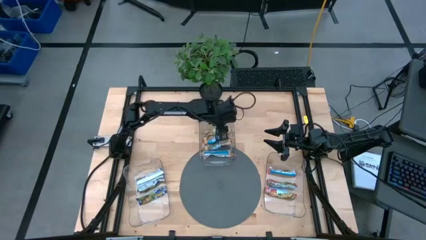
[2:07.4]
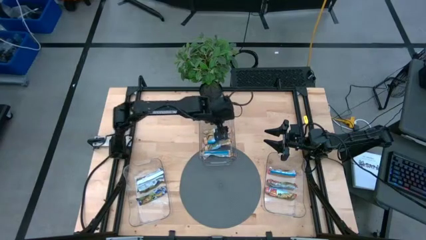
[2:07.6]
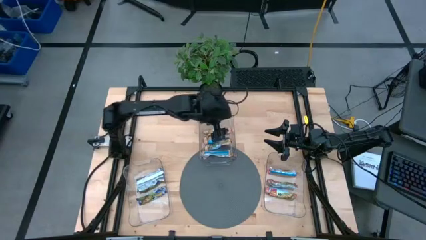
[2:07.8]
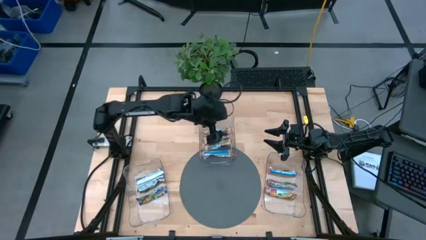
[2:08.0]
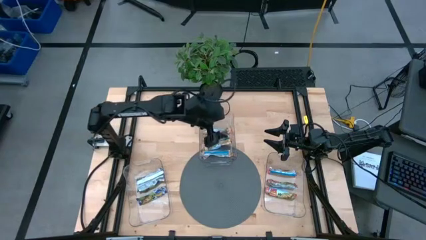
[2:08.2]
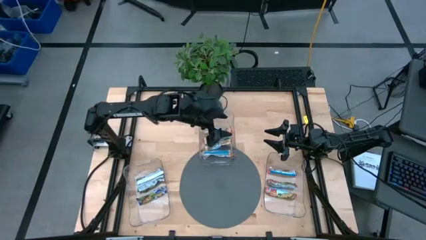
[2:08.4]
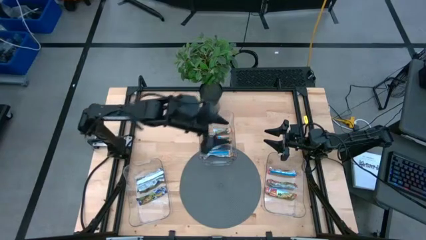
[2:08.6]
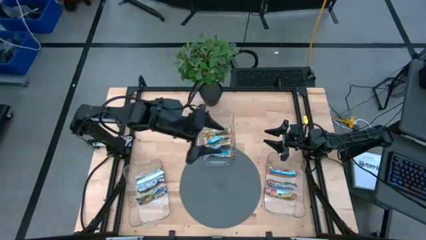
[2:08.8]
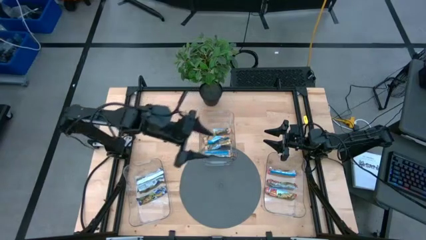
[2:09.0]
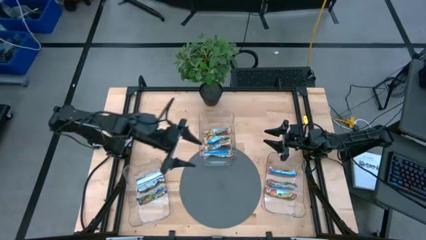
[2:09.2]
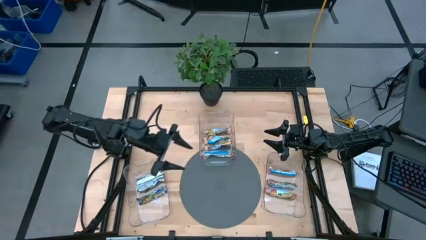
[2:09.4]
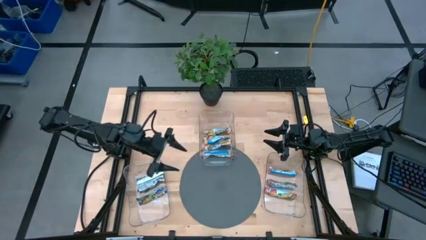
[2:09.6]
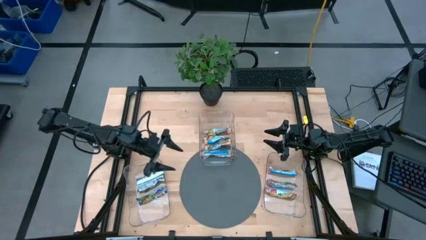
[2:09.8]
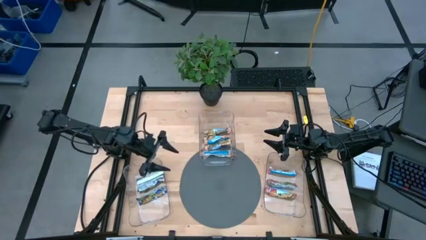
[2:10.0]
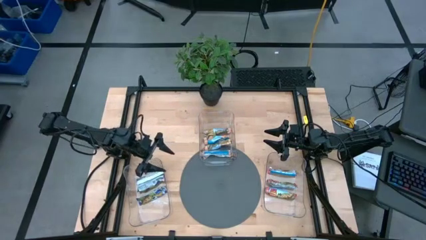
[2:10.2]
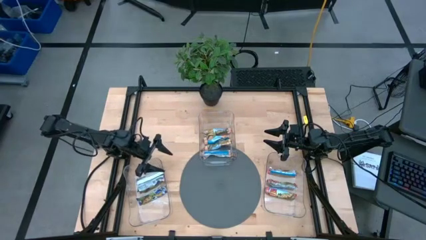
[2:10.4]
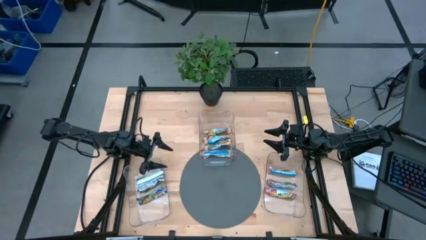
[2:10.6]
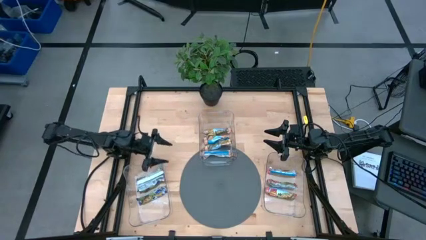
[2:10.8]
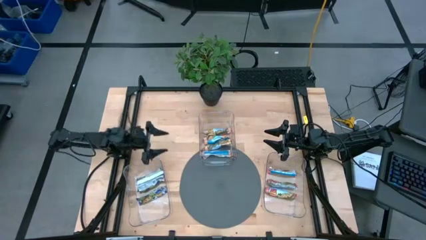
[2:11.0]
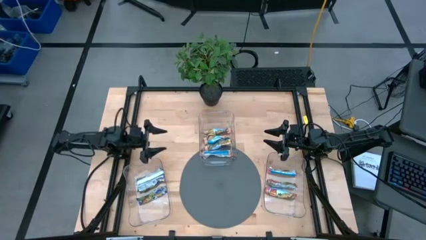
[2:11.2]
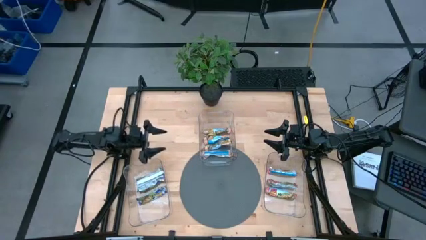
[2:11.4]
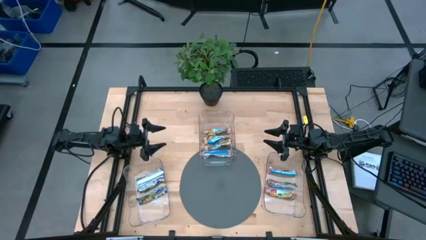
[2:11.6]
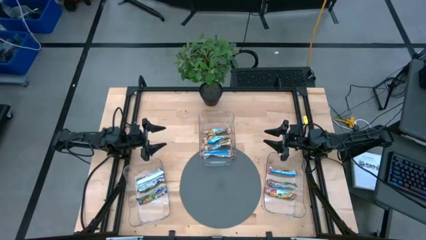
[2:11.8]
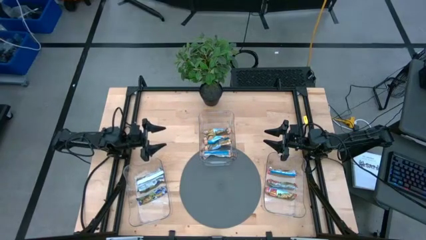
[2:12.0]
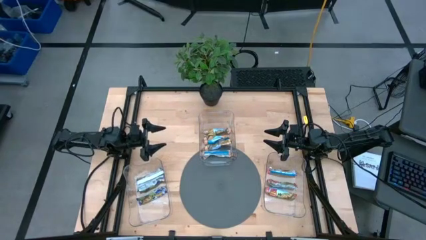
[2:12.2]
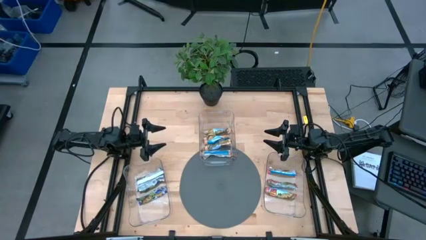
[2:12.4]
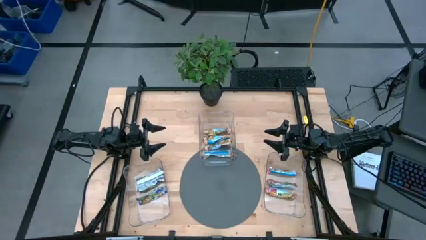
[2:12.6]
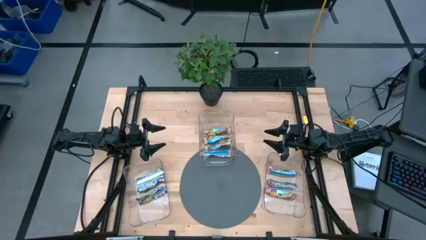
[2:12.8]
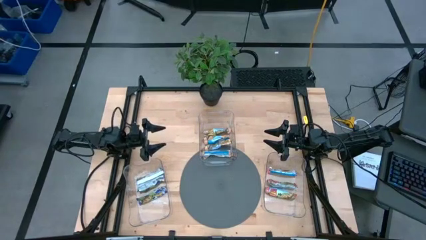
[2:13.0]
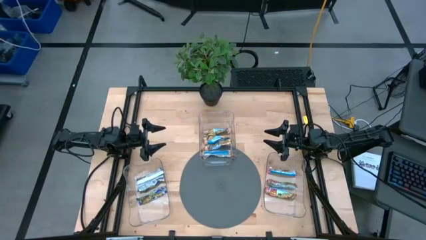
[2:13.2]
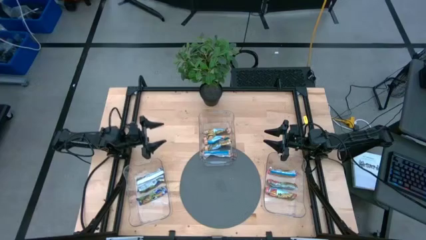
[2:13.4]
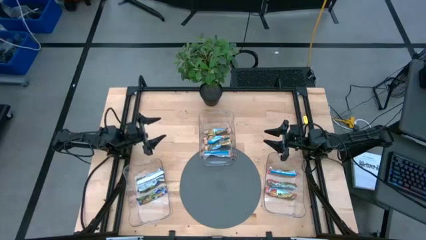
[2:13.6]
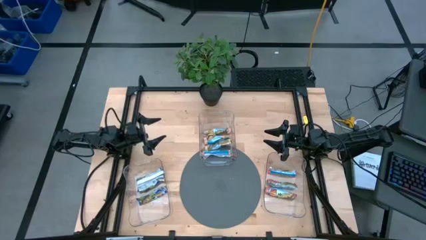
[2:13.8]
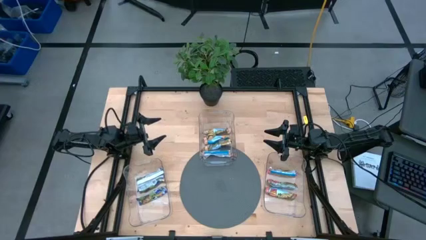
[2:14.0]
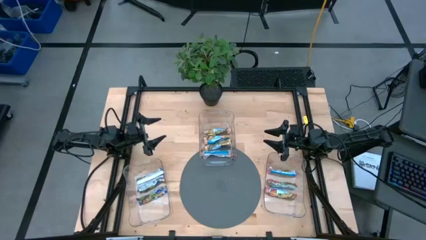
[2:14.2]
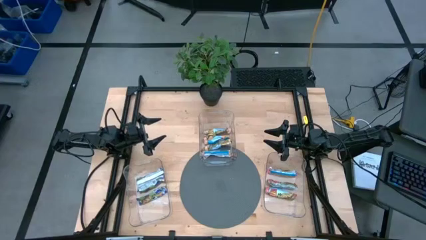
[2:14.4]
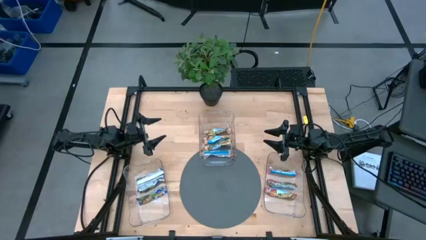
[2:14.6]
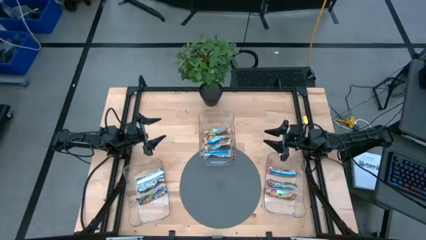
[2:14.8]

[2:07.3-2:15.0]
Task: Pick and place Granola Bars by type
Return to Home Position

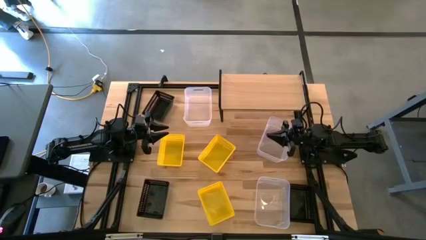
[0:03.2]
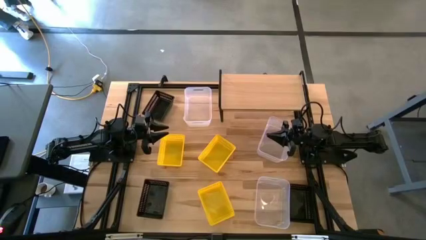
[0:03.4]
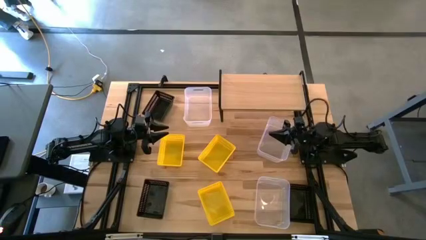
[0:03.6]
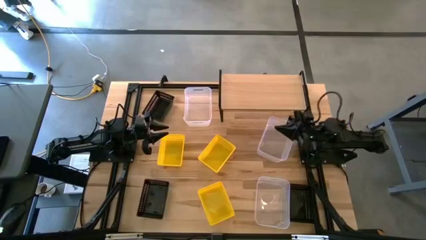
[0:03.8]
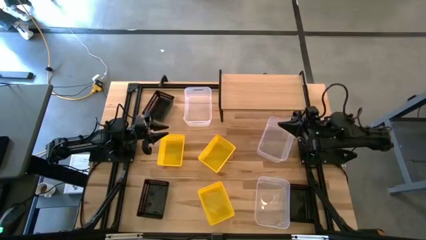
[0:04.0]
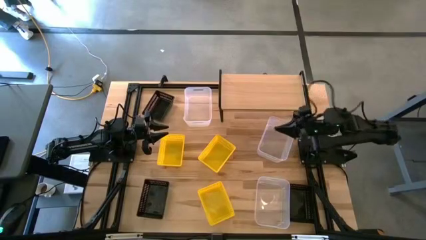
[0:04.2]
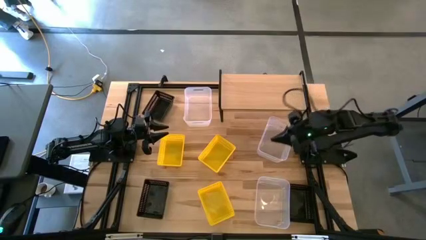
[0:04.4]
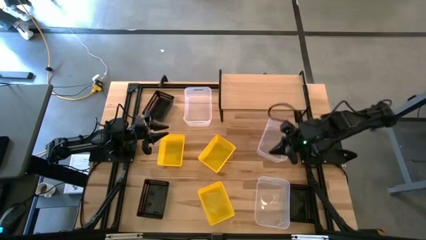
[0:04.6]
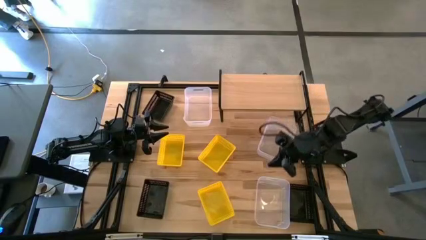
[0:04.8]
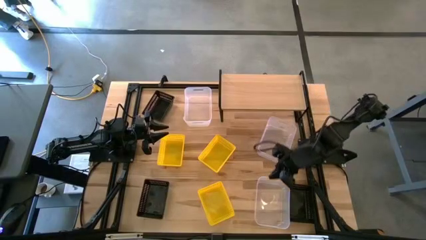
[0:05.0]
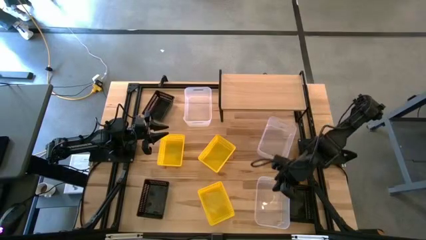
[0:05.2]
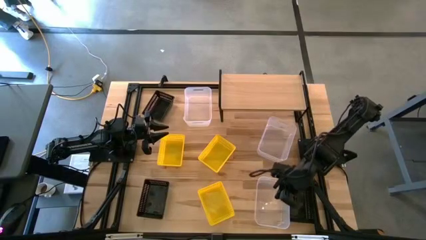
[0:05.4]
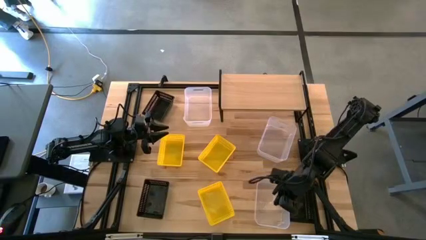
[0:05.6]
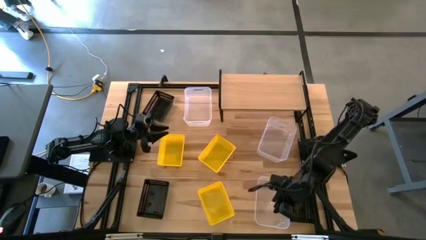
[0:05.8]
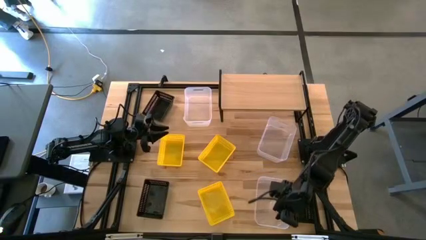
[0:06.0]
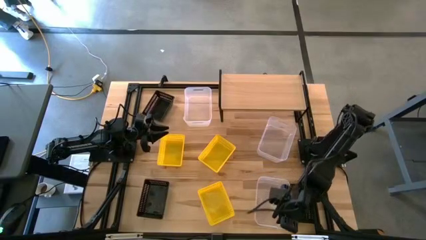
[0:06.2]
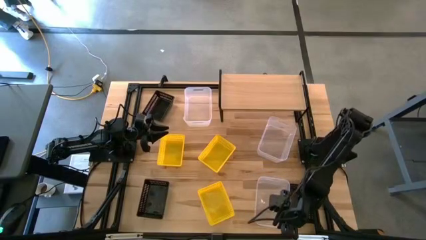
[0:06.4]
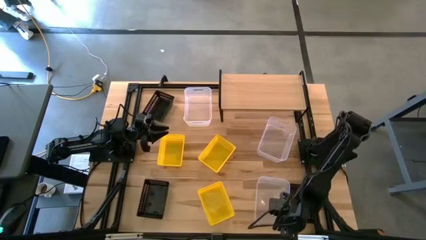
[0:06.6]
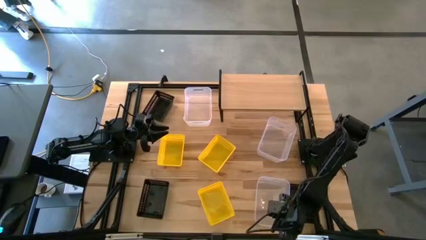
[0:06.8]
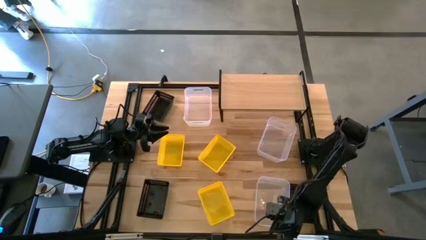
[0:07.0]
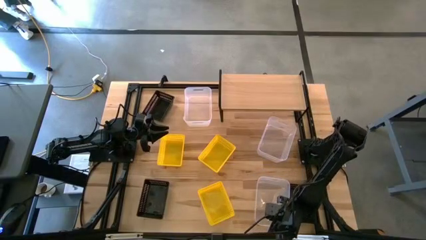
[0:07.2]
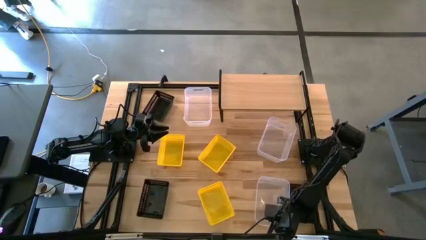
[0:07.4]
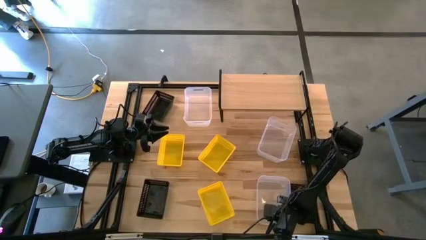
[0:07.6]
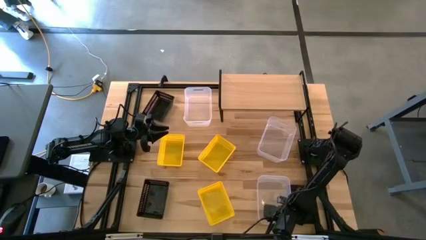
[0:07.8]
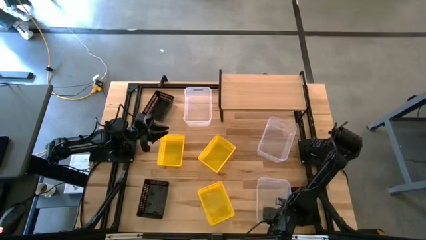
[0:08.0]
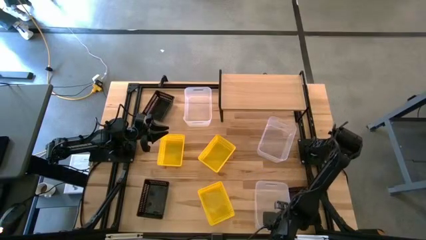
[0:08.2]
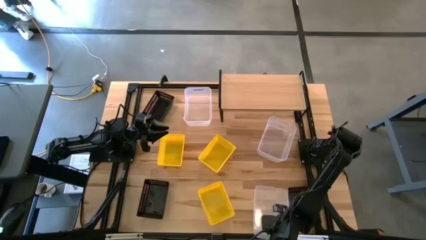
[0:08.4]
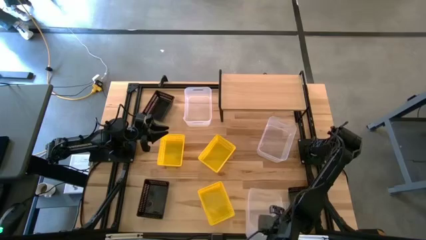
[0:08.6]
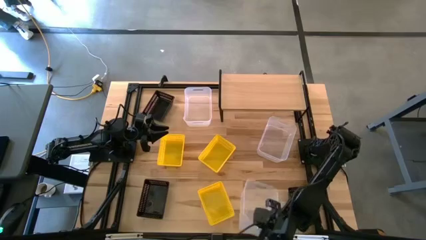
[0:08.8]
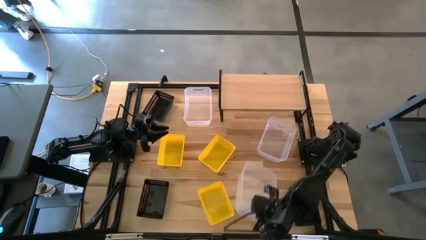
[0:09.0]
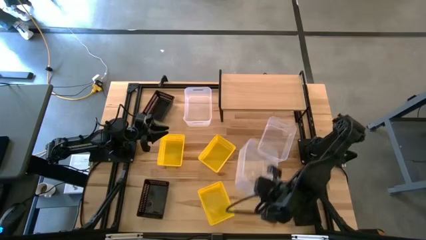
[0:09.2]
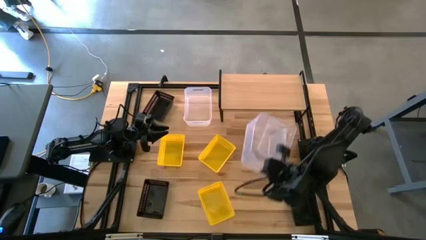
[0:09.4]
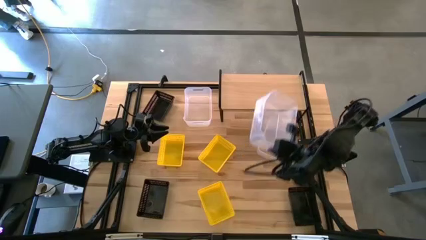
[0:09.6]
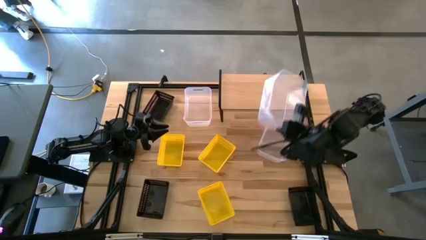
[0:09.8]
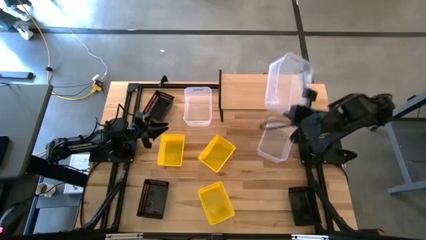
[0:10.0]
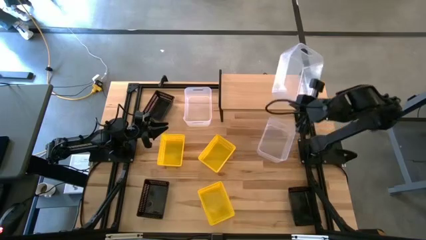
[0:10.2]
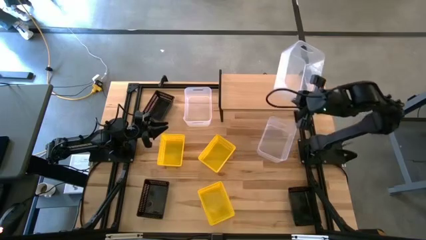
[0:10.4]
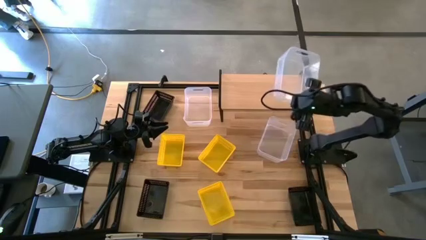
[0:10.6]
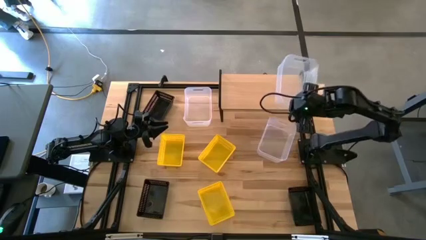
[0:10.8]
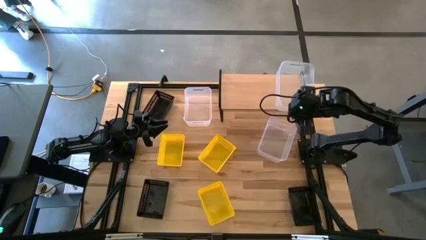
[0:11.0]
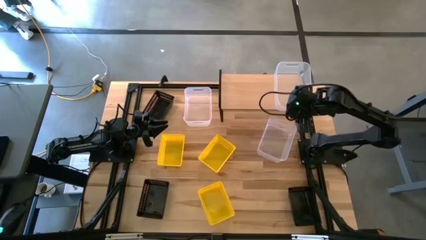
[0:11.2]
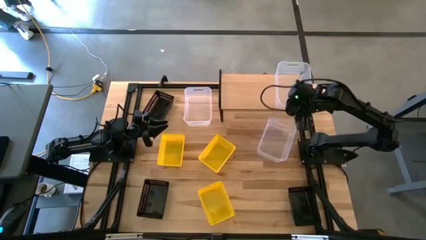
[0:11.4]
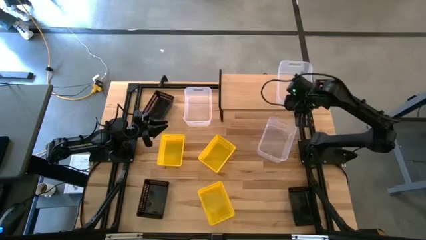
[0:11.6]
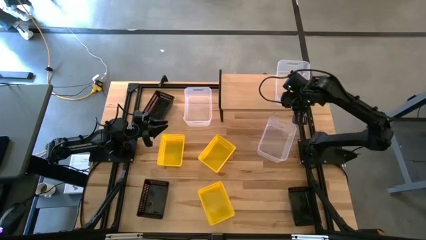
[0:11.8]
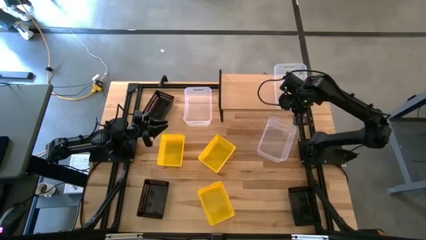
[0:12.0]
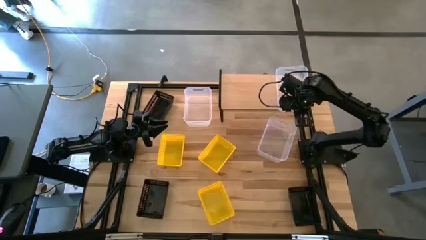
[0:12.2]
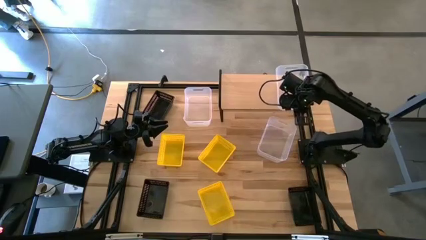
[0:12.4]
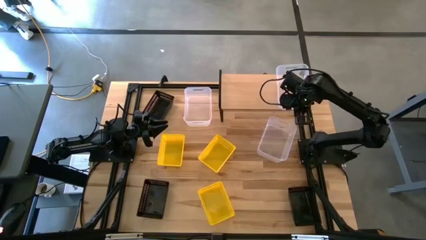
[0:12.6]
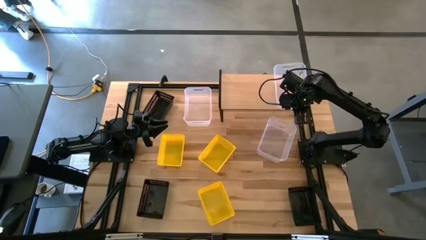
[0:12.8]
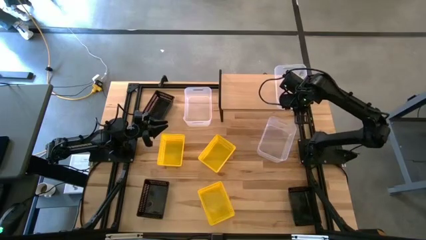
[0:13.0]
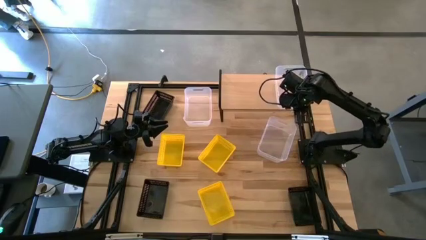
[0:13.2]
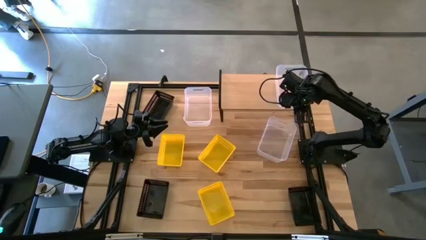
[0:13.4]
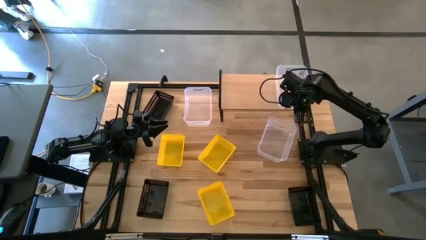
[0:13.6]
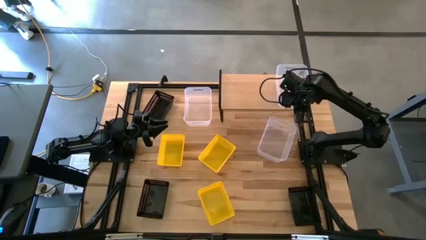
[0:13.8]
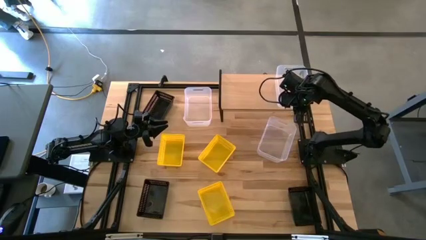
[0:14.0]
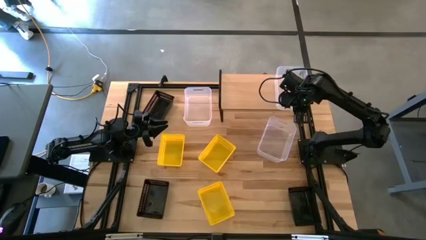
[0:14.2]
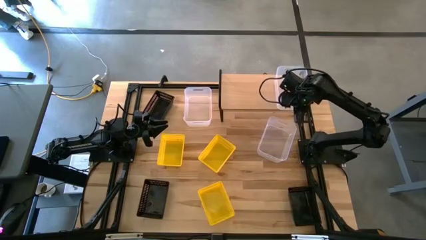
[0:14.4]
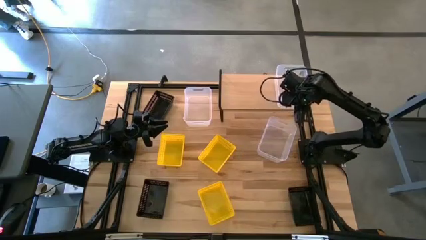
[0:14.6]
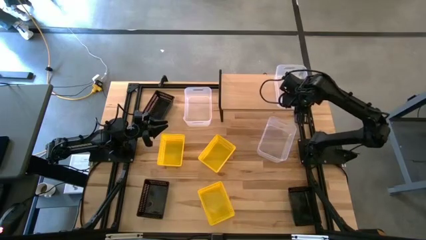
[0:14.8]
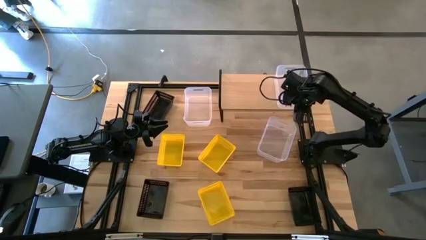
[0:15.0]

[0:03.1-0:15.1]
Task: Stack baskets on shelf by color
Put the bottom transparent bin on the shelf
